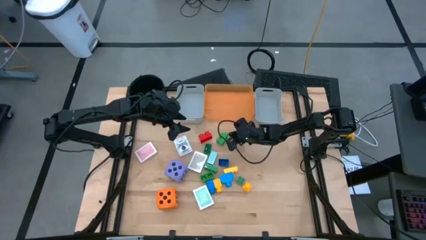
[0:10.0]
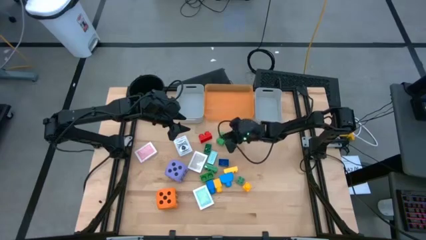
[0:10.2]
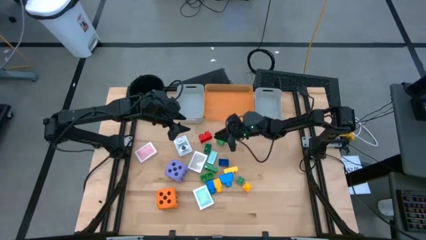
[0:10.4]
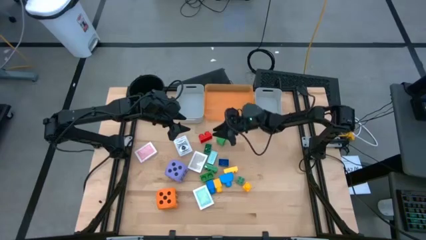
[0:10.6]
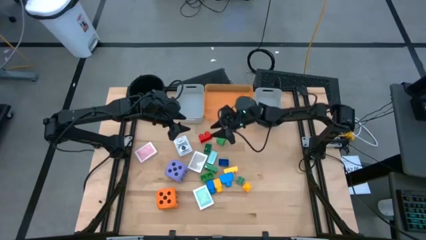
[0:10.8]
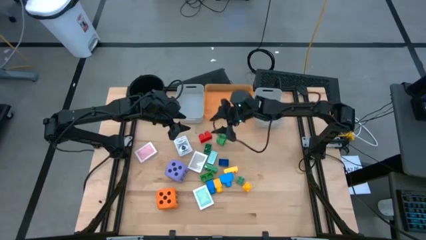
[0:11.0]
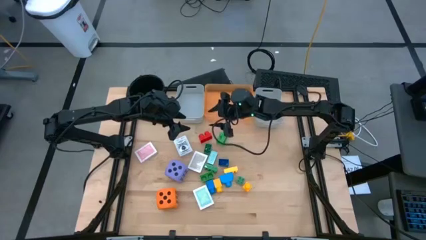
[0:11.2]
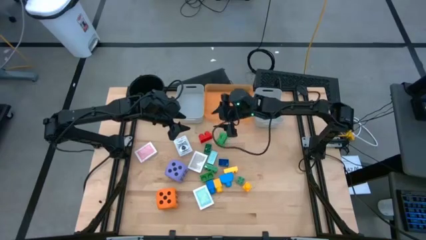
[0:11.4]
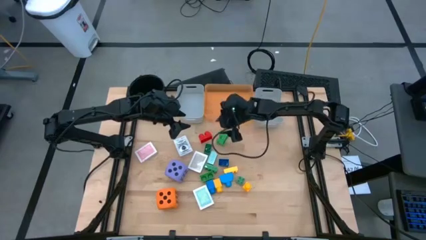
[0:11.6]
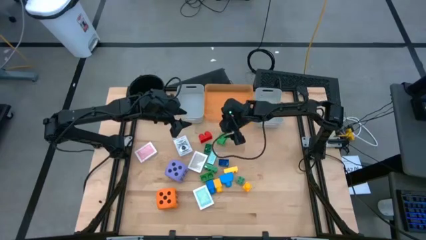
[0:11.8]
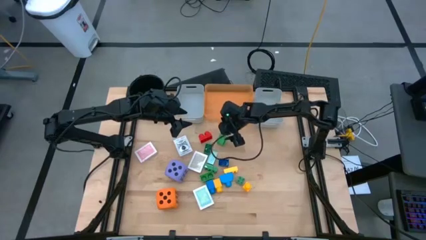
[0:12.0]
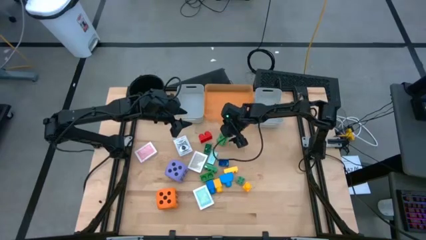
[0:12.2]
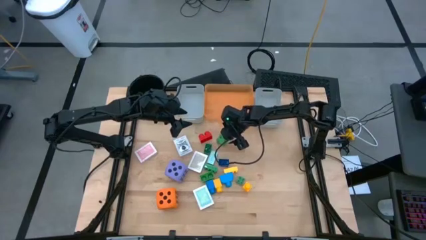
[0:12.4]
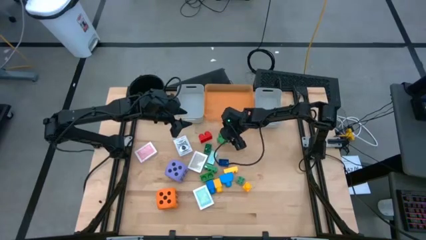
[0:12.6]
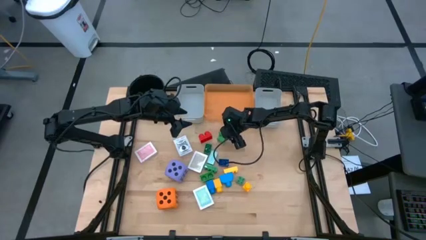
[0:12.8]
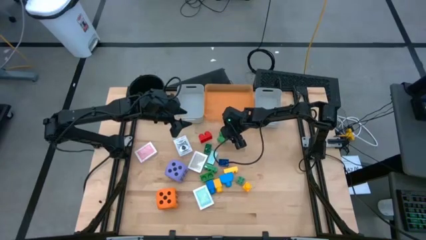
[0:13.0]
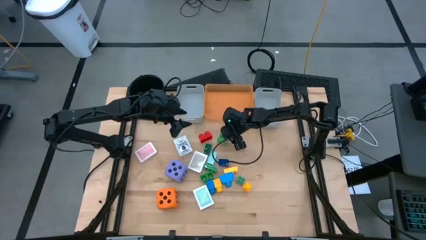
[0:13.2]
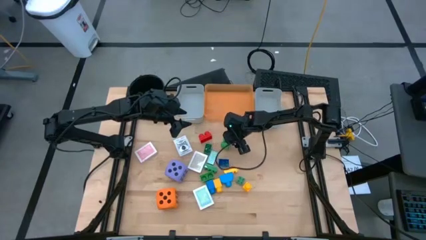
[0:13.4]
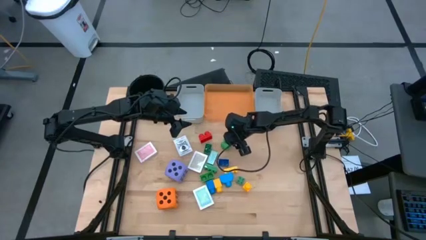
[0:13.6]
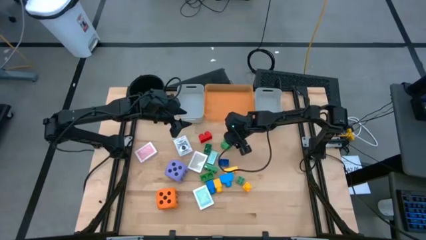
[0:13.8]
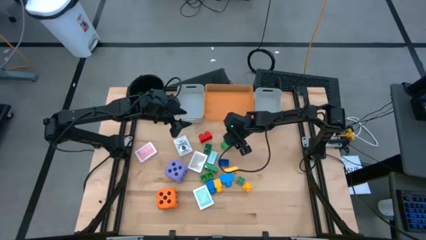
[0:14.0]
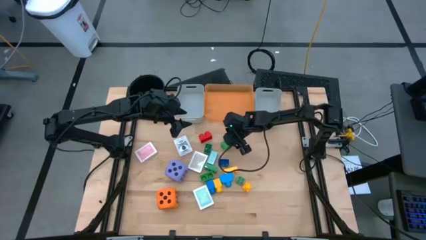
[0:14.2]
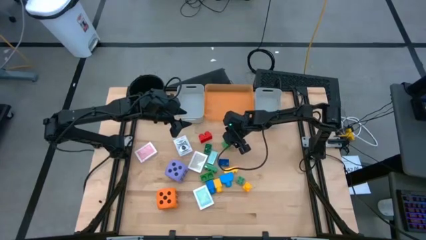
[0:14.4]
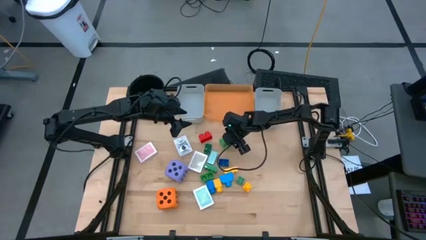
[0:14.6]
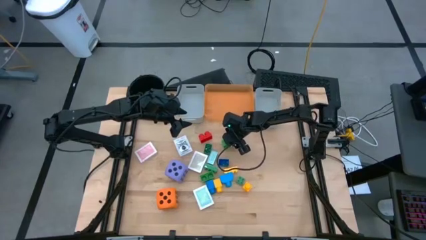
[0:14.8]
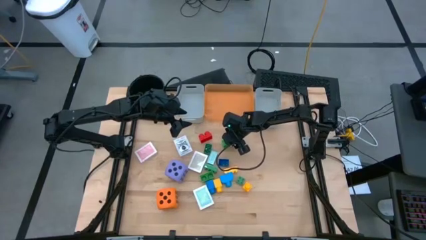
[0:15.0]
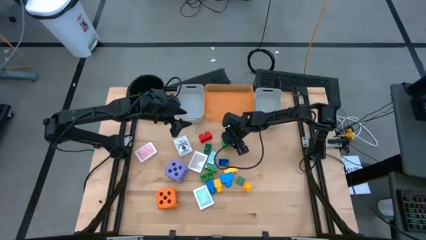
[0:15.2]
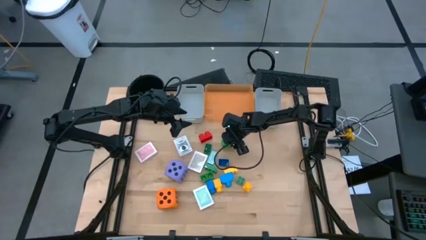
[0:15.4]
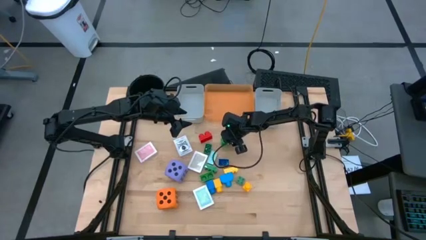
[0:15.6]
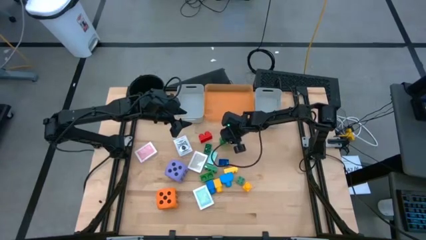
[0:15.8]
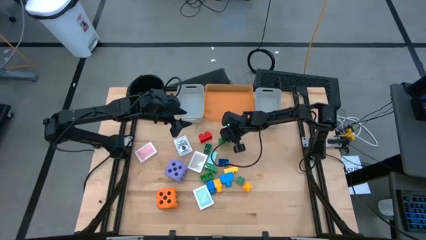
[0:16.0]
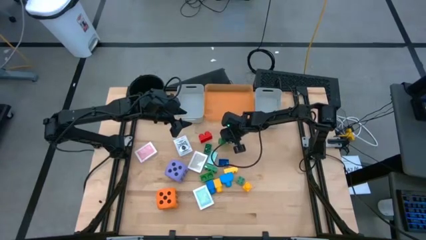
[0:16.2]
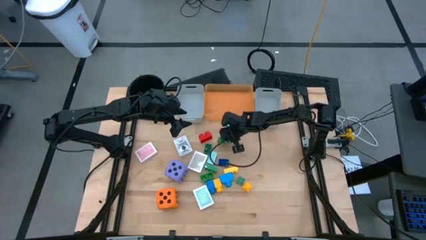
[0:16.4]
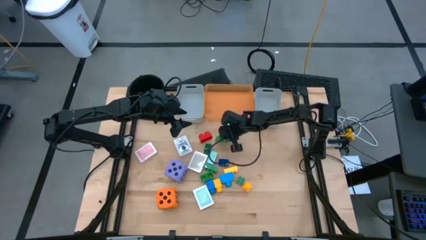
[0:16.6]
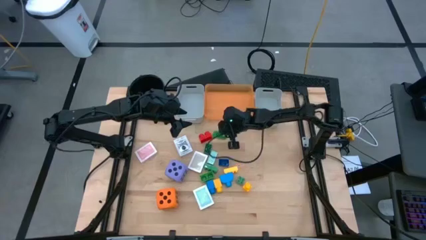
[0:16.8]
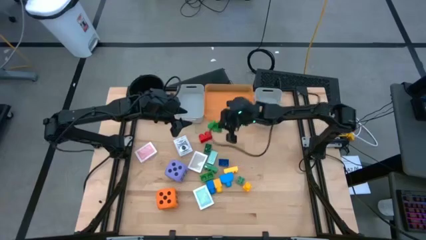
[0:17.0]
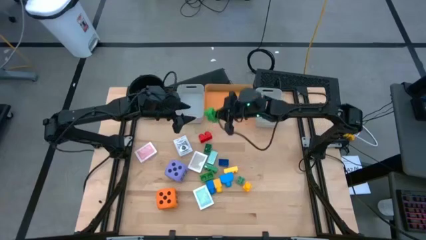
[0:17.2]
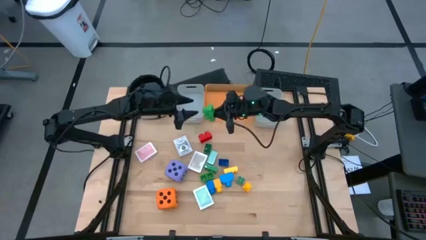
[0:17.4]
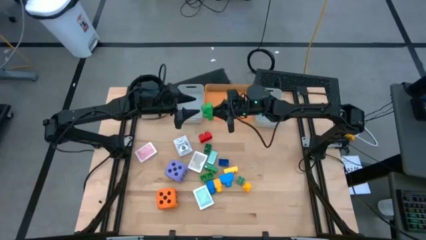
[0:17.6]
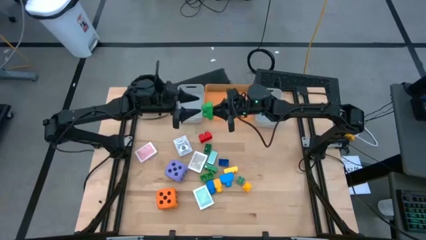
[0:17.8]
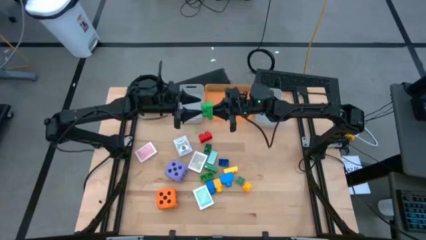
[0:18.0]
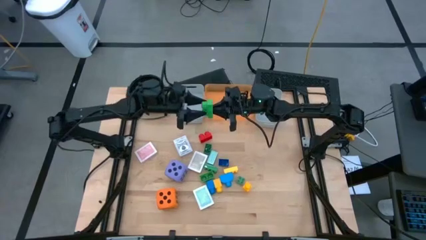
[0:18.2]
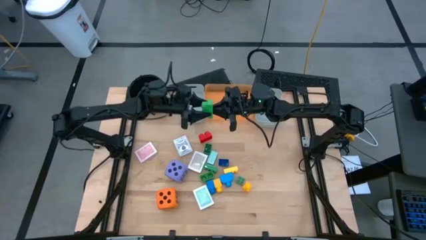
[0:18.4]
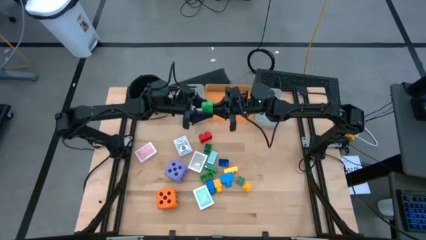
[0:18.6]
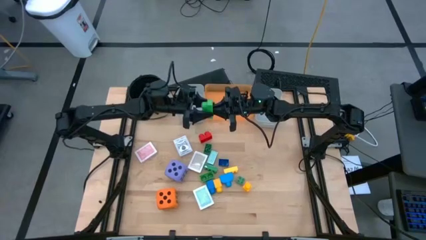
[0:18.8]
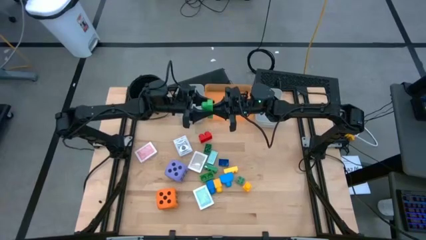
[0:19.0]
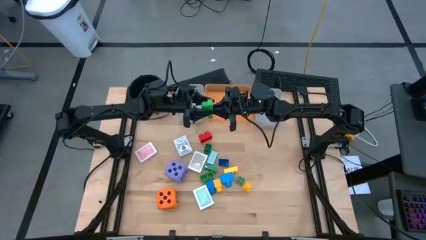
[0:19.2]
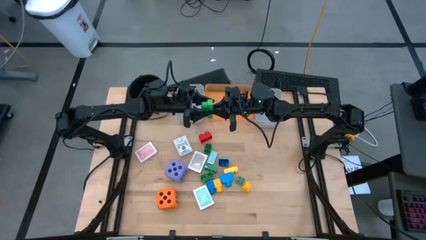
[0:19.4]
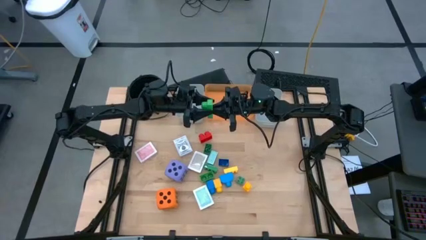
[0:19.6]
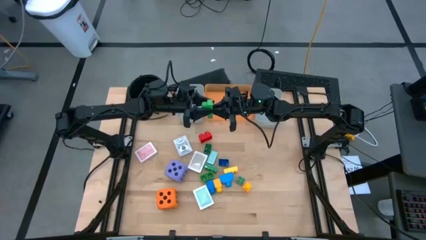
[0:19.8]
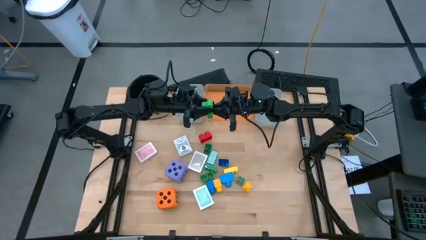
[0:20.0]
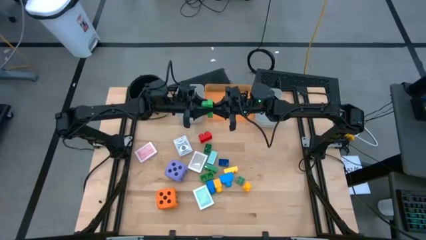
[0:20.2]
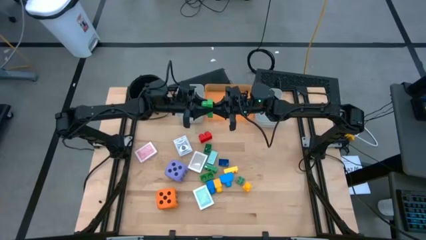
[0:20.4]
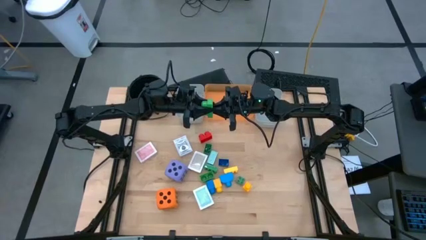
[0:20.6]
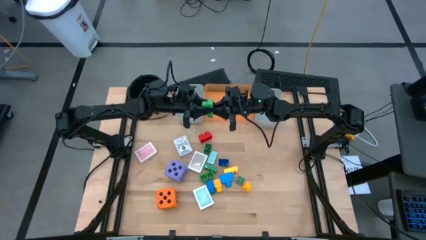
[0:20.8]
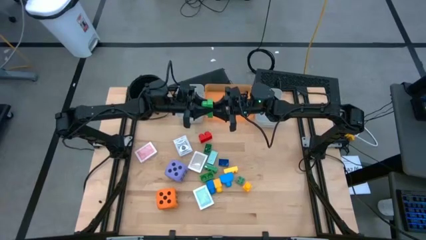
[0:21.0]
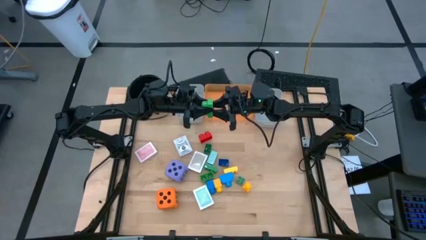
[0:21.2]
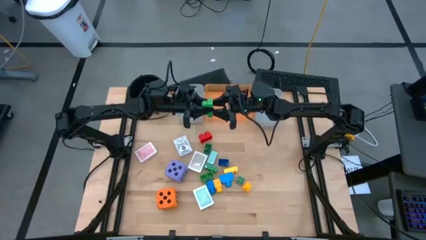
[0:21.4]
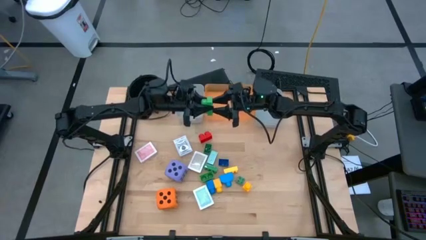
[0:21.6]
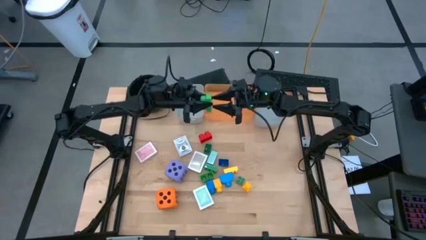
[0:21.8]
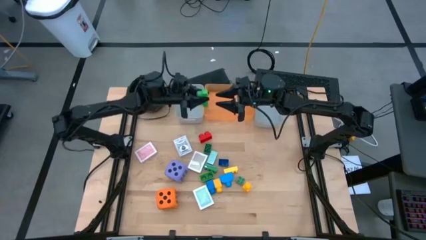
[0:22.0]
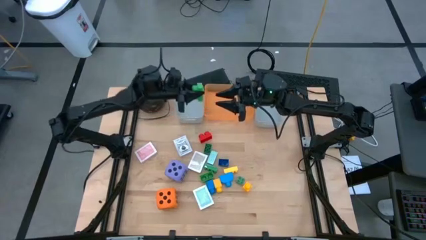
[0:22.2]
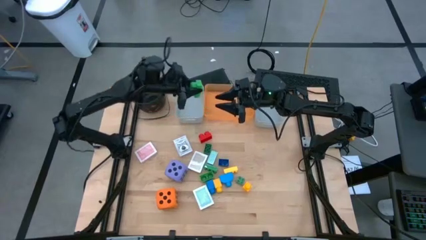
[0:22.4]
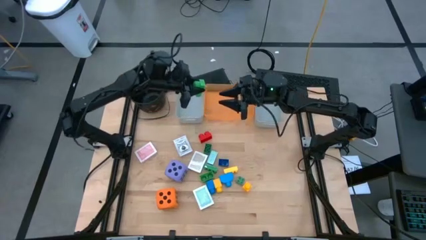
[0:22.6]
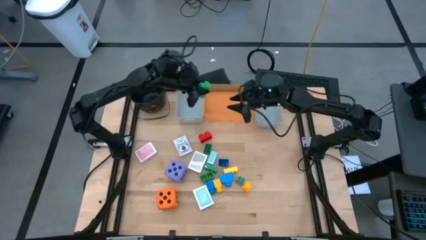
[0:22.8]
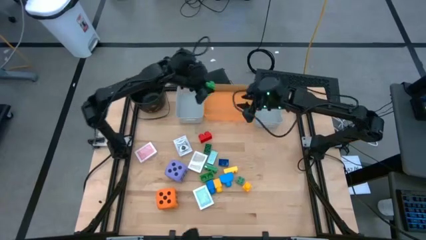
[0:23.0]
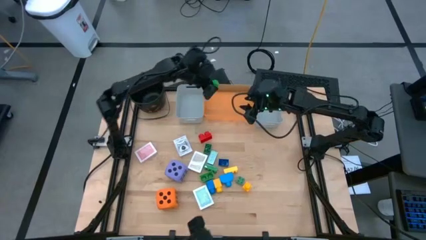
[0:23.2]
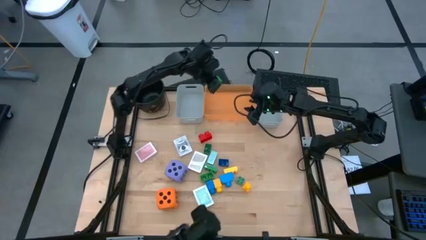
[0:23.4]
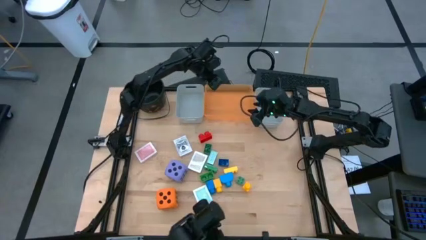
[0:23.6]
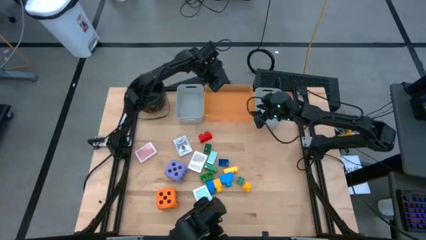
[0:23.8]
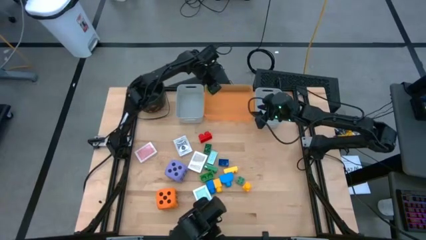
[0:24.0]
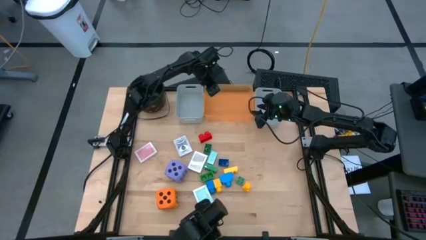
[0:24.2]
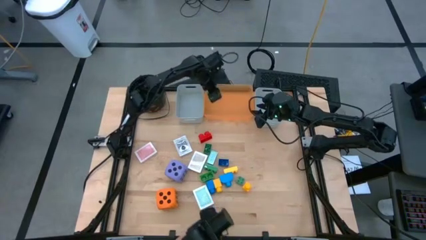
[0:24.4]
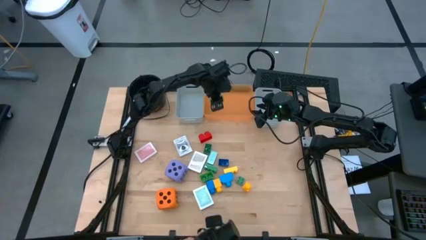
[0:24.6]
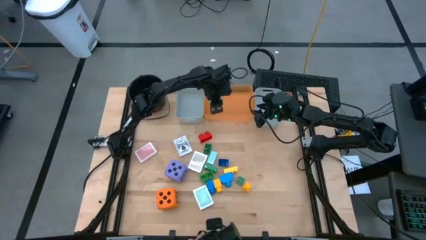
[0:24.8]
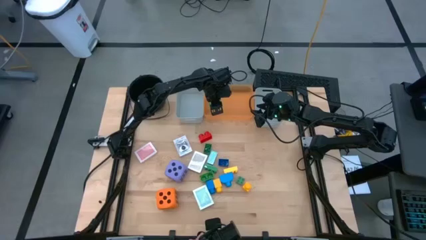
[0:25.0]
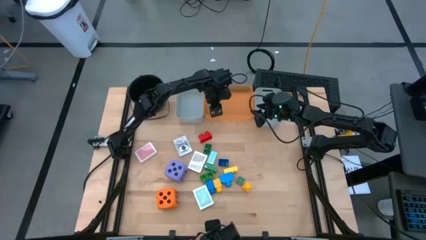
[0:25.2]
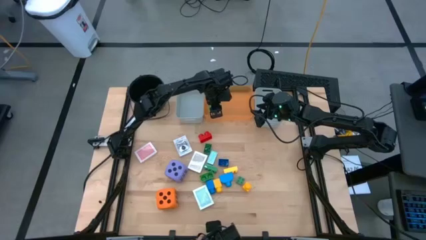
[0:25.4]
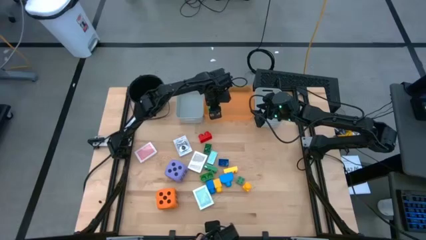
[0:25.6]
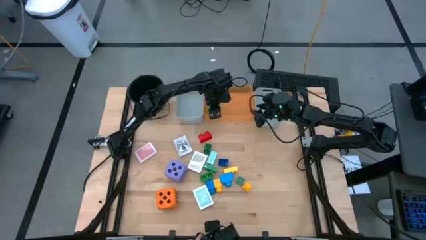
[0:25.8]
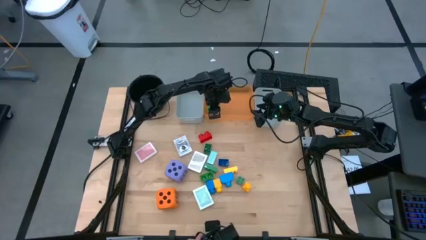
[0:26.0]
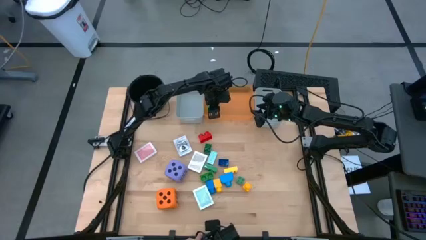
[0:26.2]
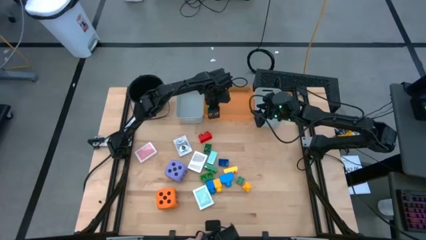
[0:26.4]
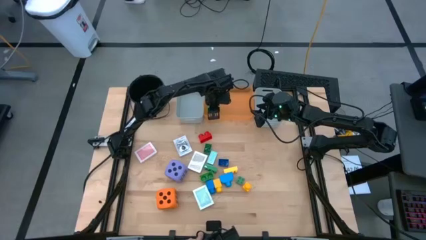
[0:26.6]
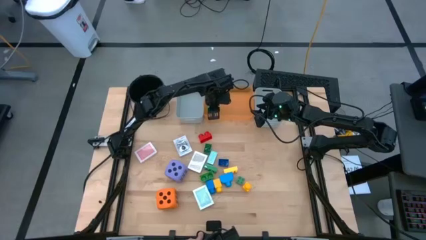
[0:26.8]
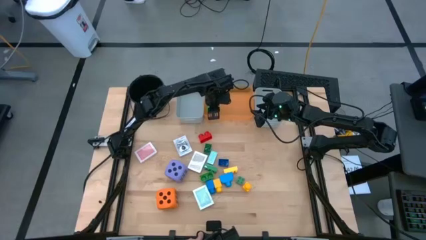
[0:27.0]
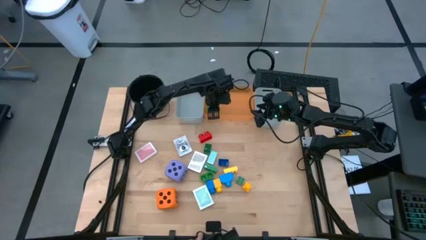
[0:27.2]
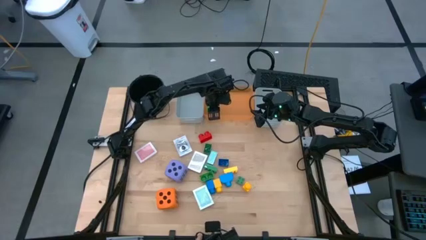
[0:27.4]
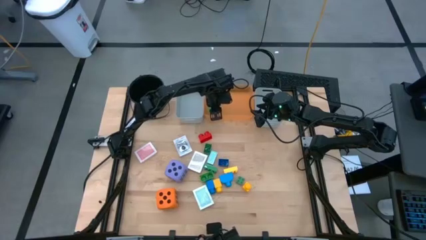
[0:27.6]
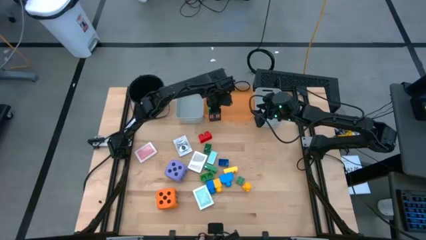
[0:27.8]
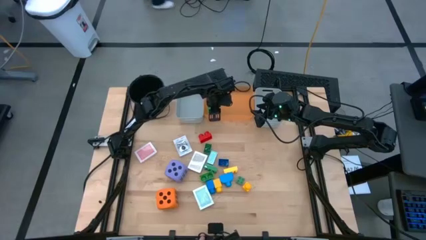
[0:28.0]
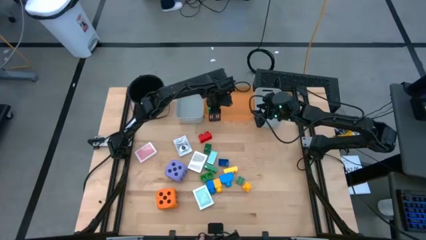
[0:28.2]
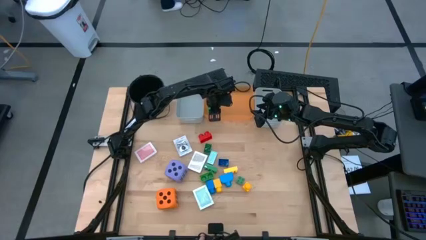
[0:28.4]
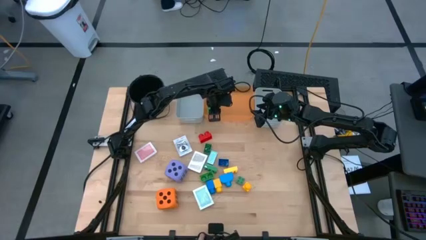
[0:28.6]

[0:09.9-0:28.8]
Task: Pick & Place Toys
Put the top green game piece into the orange bin
